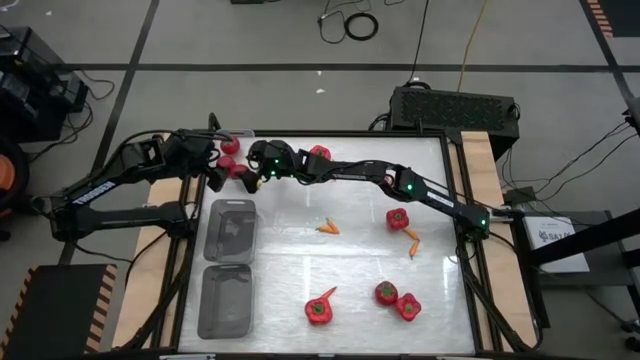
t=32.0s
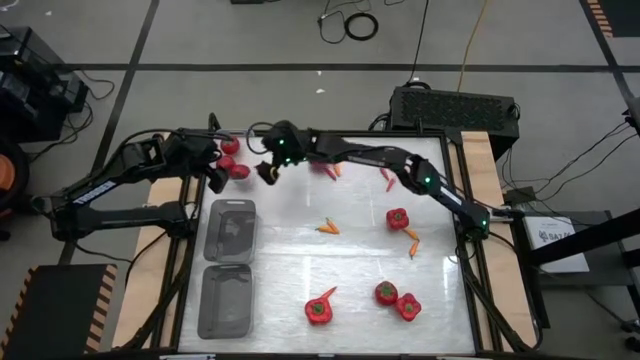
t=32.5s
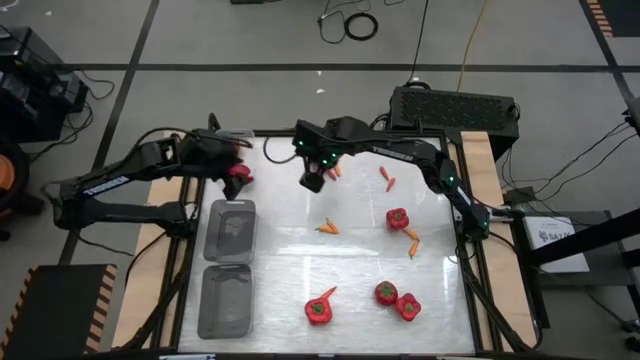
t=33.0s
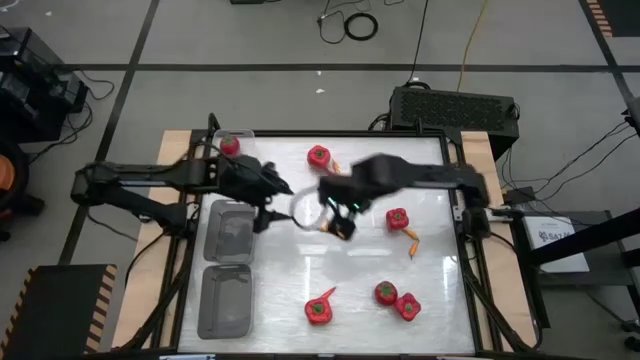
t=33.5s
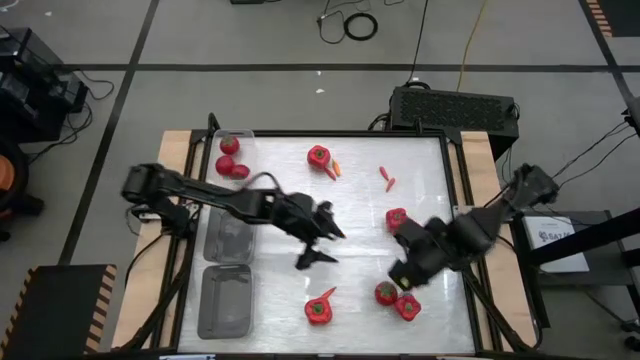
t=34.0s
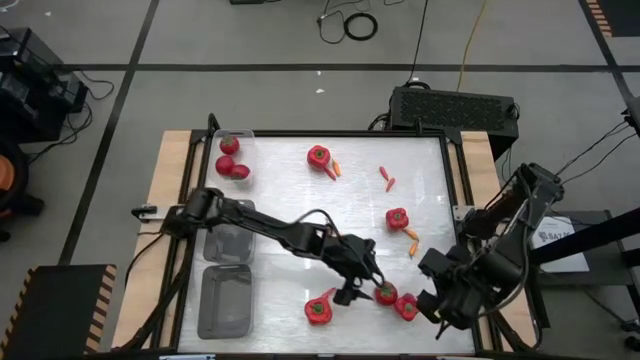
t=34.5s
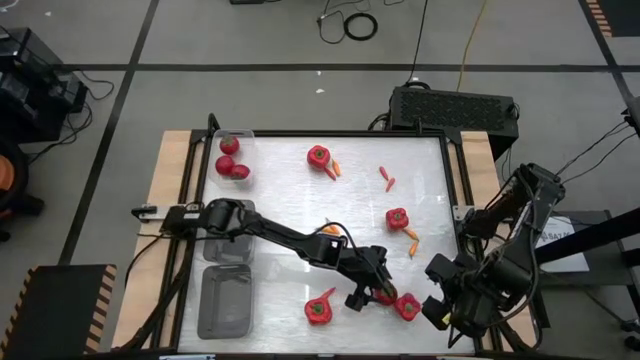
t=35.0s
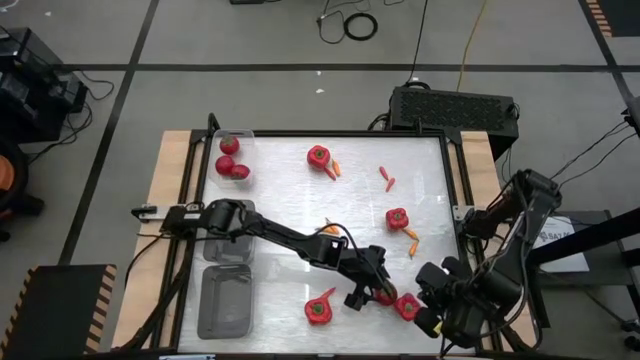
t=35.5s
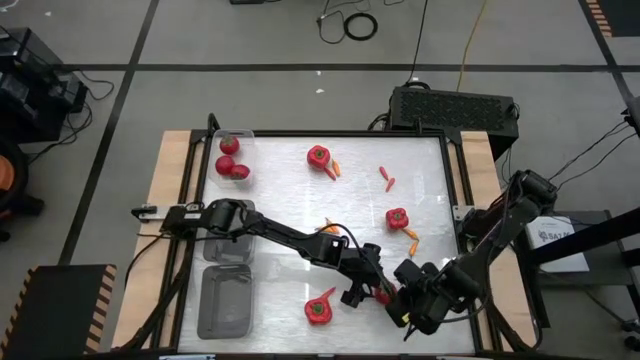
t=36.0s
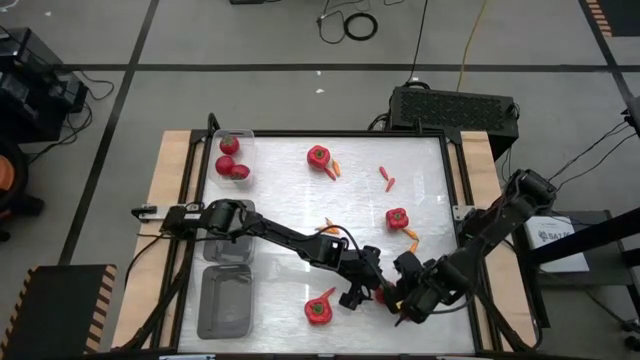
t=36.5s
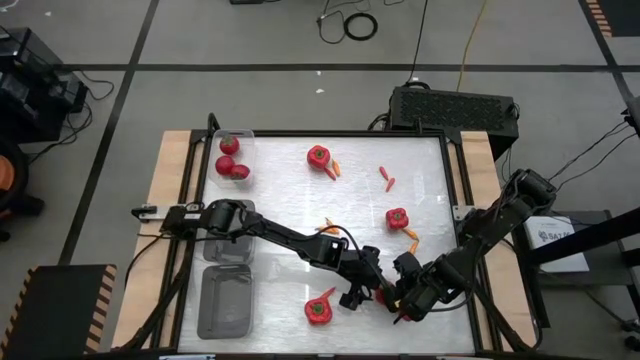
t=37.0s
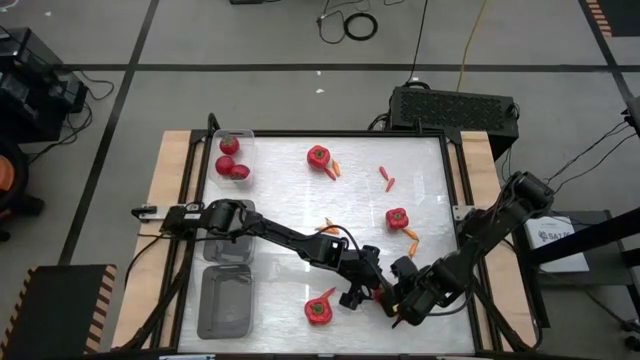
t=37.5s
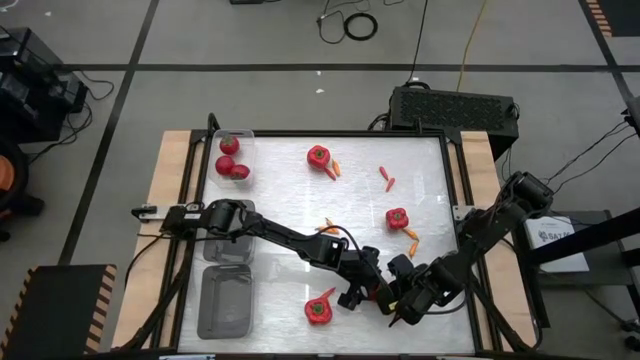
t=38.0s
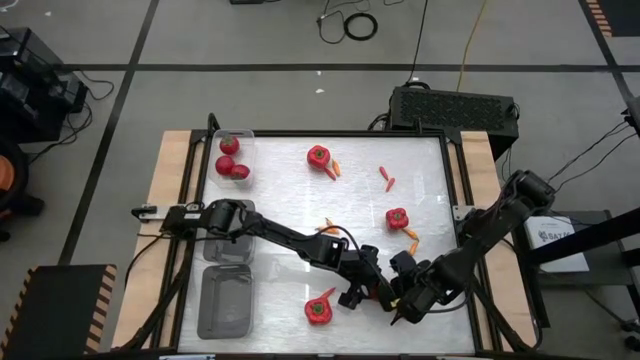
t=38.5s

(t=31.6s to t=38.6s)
Task: Sort produce into baskets
Put the red tomato into the transparent bin

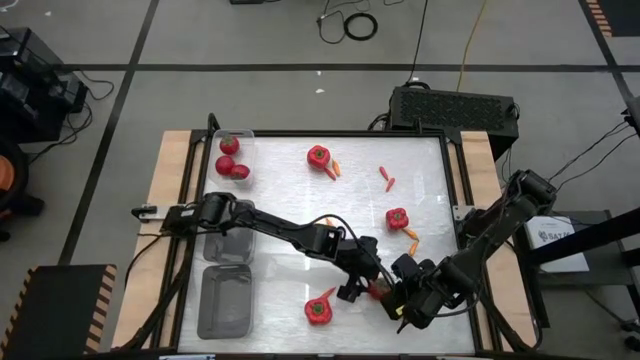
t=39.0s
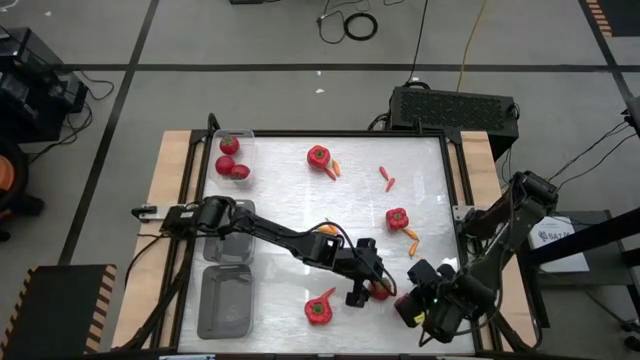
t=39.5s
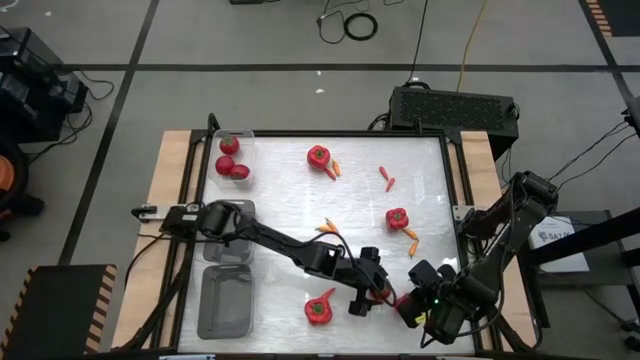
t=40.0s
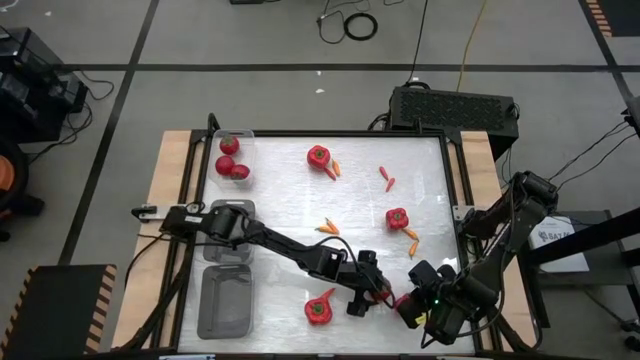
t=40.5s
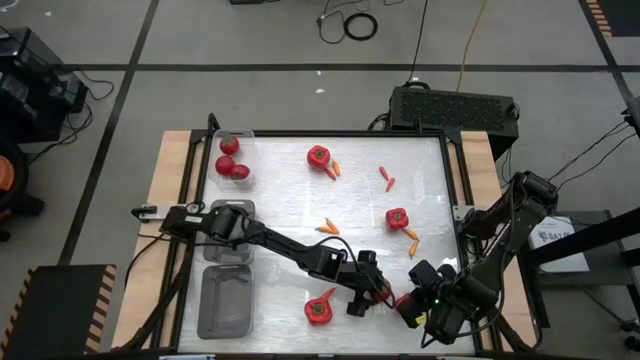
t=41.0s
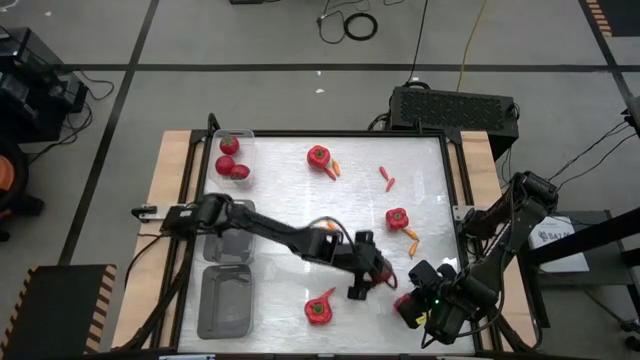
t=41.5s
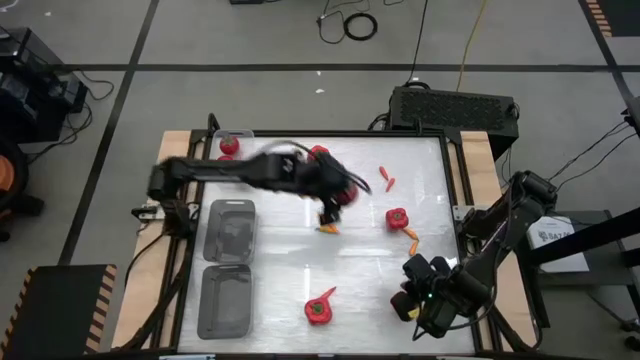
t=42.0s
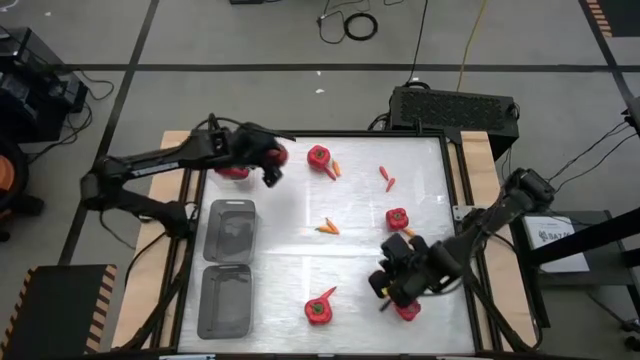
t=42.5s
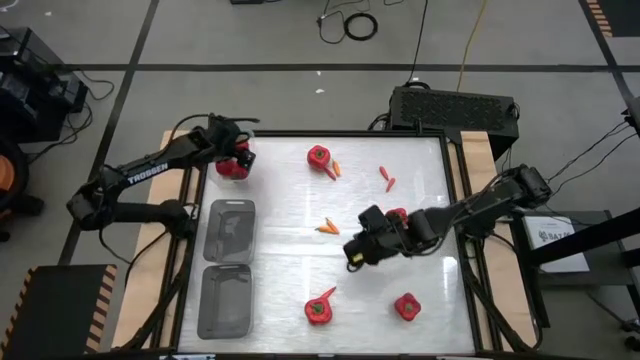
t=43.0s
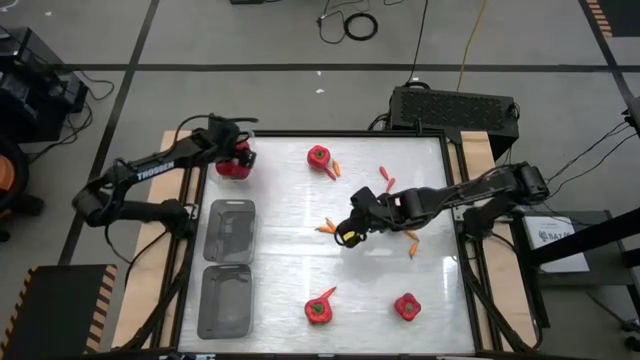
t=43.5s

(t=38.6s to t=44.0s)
Put the red tomato into the transparent bin

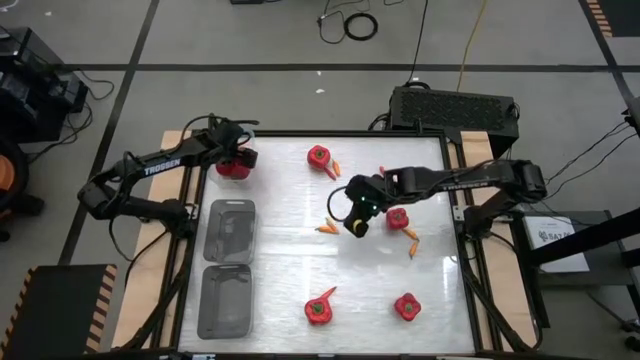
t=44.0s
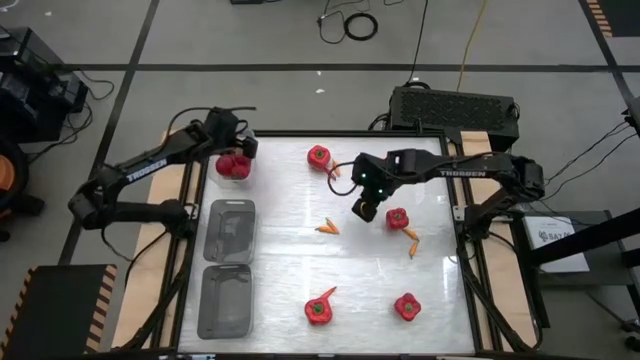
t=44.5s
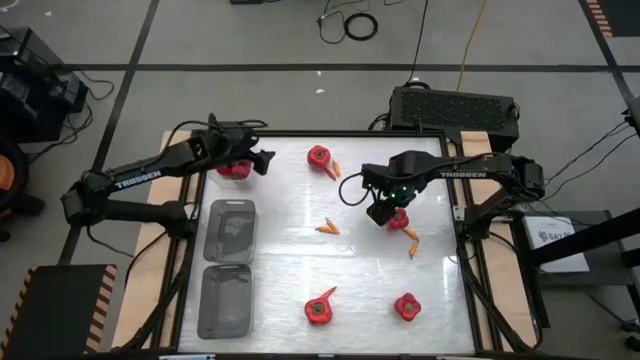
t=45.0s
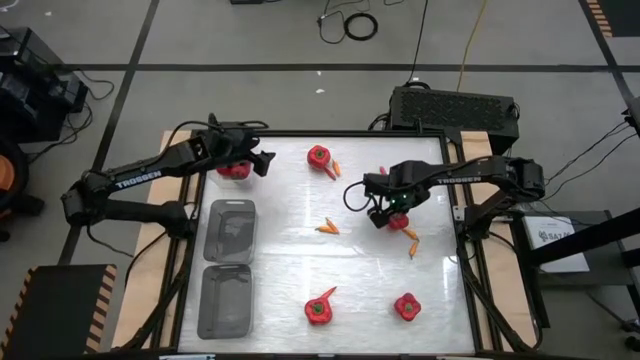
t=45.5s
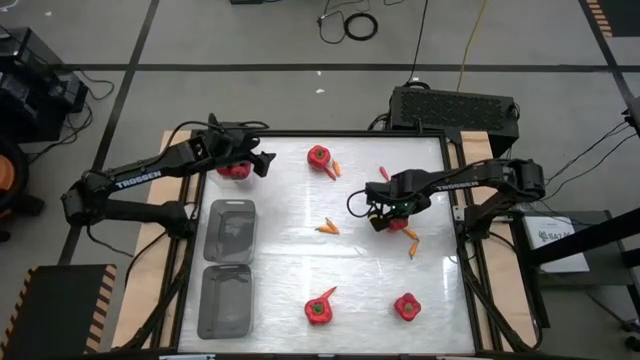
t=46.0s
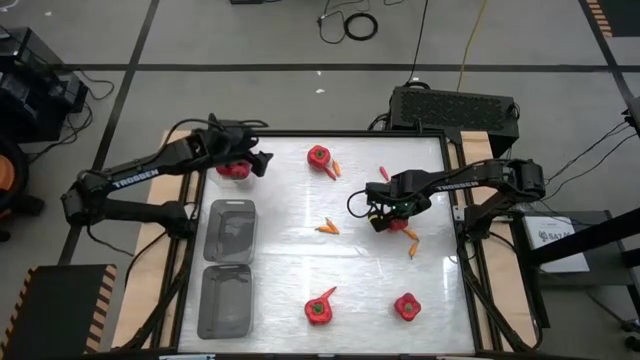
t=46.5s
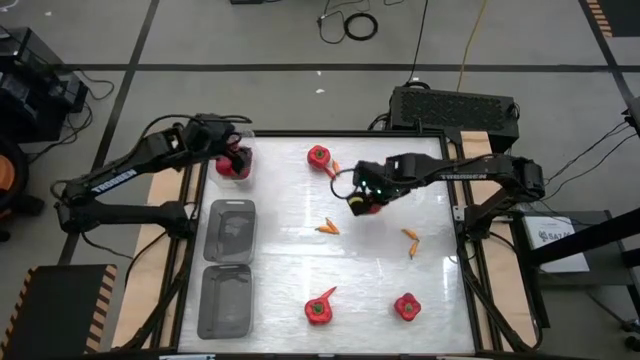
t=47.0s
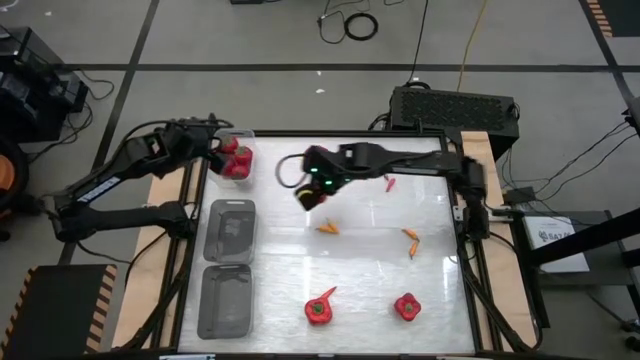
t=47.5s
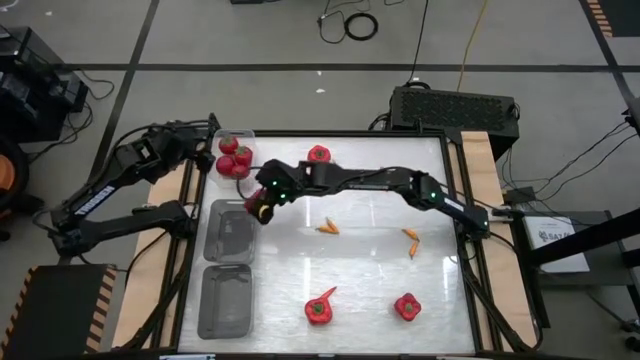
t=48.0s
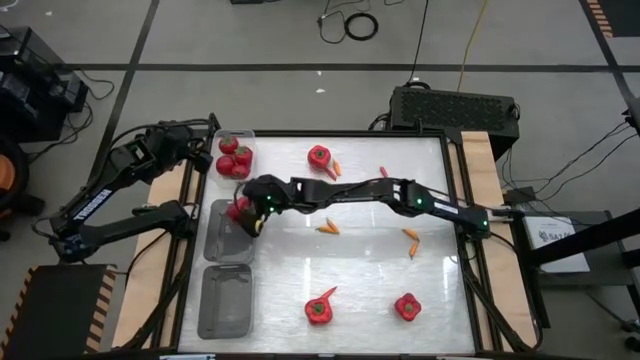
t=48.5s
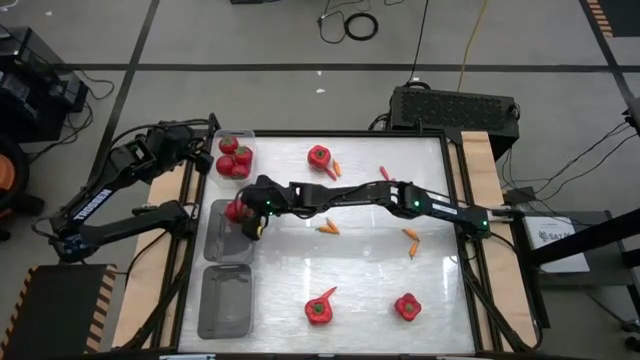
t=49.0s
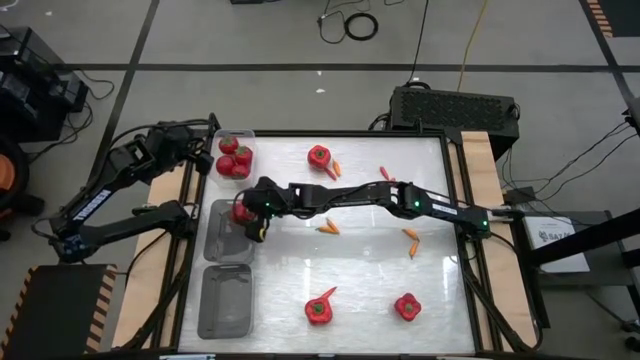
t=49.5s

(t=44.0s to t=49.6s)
Put the red bell pepper into the top black bin

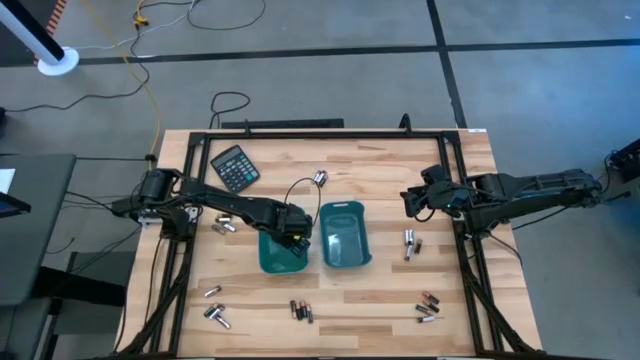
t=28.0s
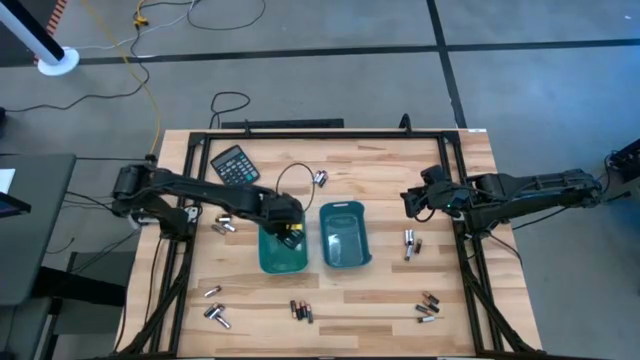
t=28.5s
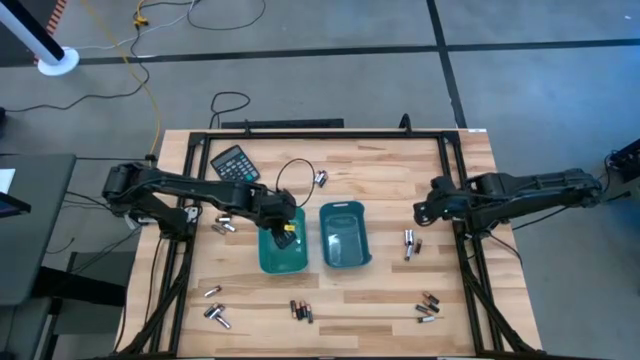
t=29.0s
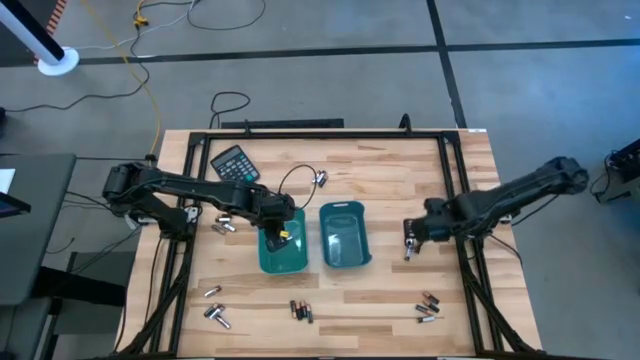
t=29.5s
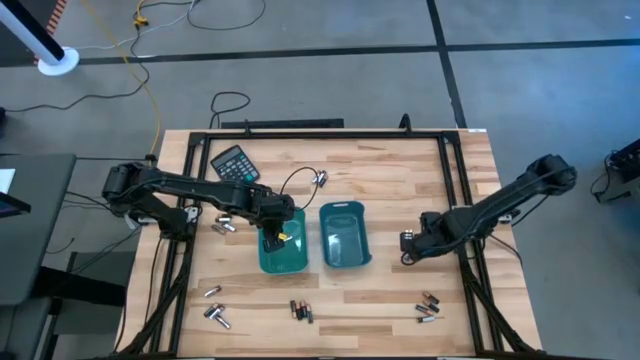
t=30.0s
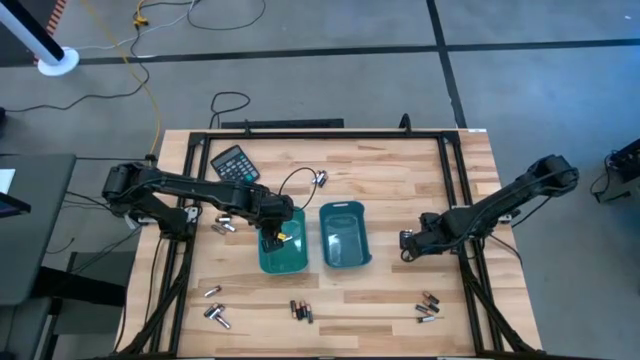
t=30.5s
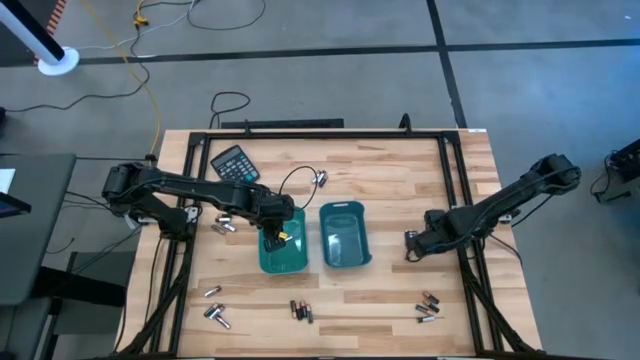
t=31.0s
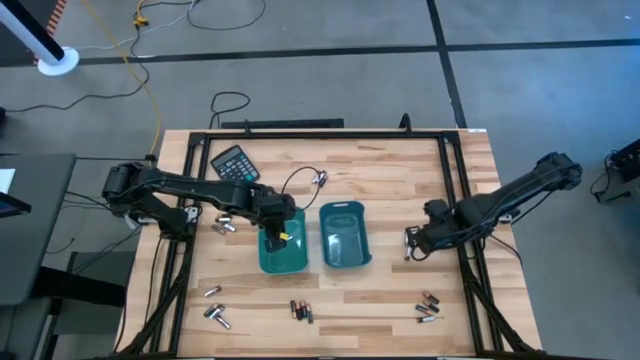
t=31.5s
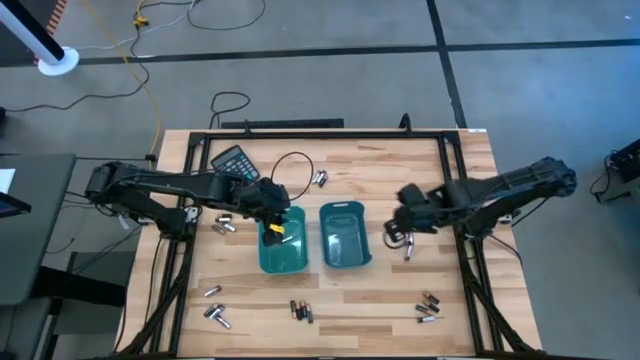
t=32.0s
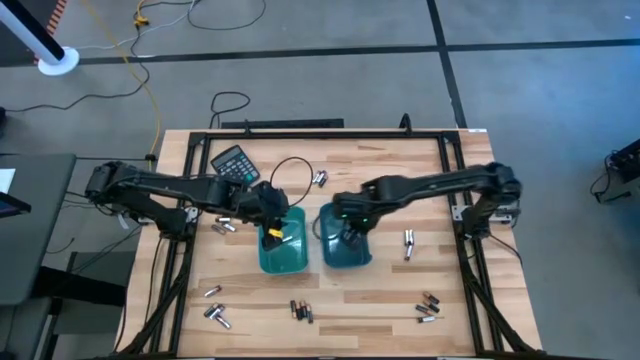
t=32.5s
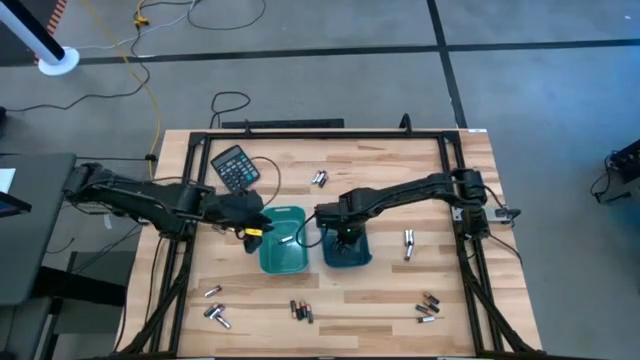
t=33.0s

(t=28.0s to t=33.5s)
Task: Sort batteries
Put the black battery into the blue bin
